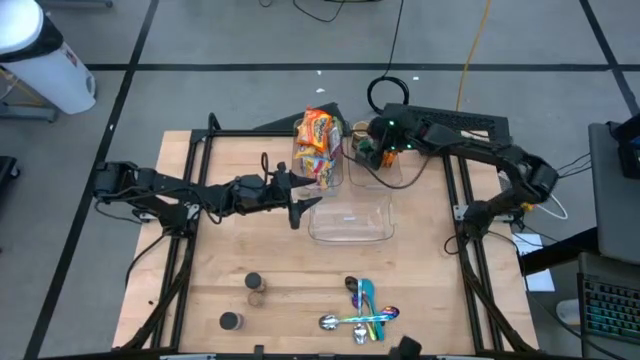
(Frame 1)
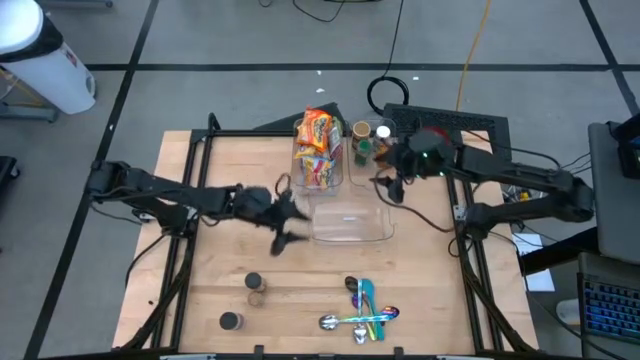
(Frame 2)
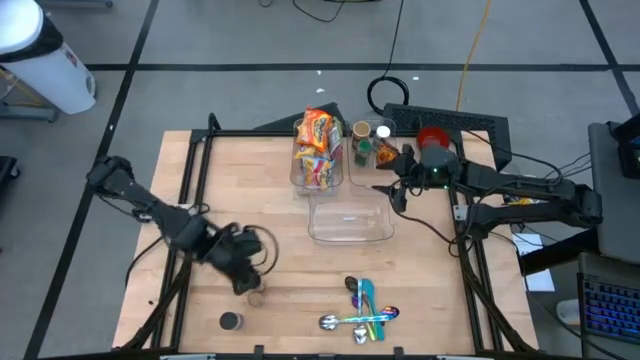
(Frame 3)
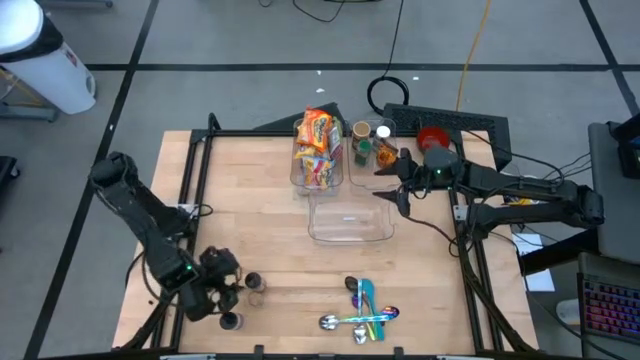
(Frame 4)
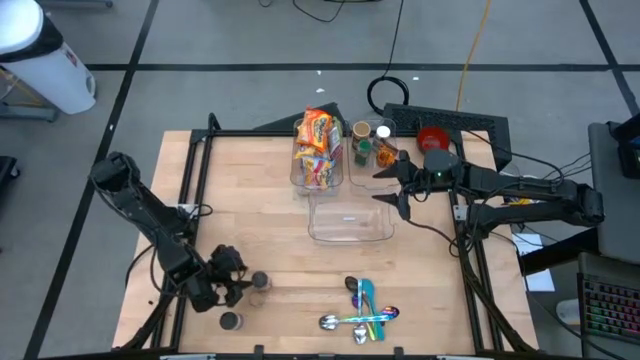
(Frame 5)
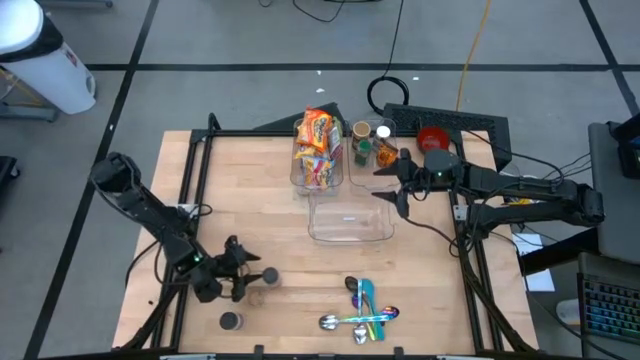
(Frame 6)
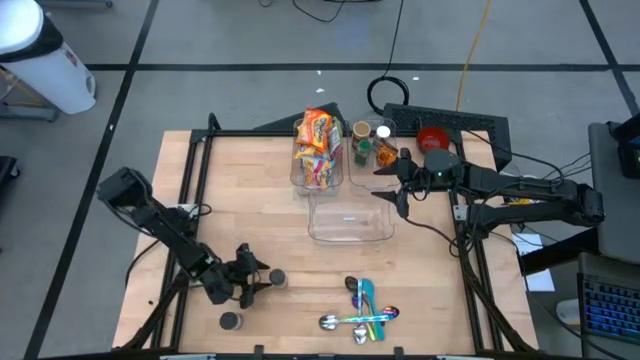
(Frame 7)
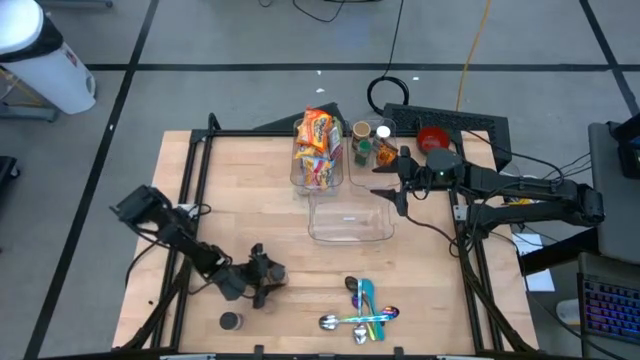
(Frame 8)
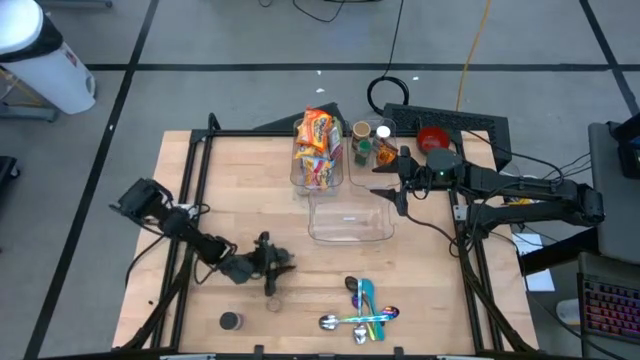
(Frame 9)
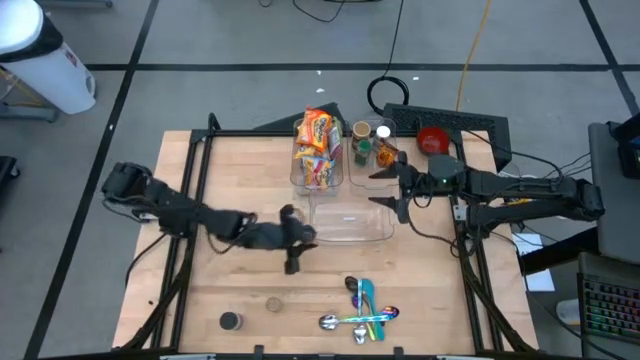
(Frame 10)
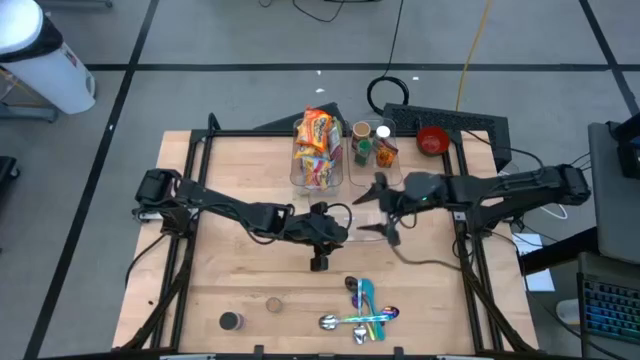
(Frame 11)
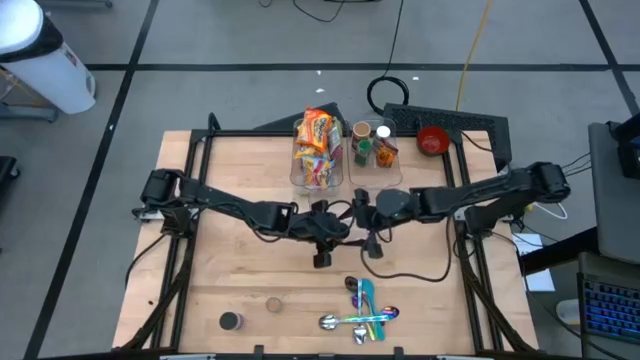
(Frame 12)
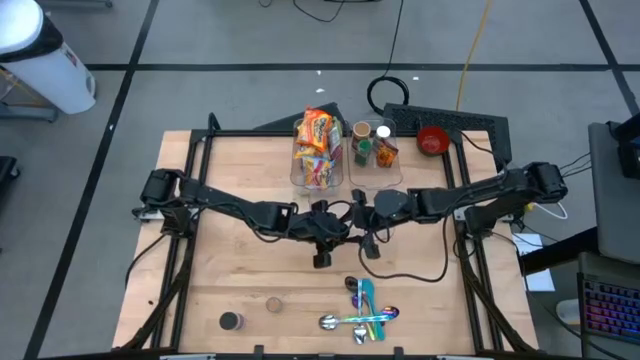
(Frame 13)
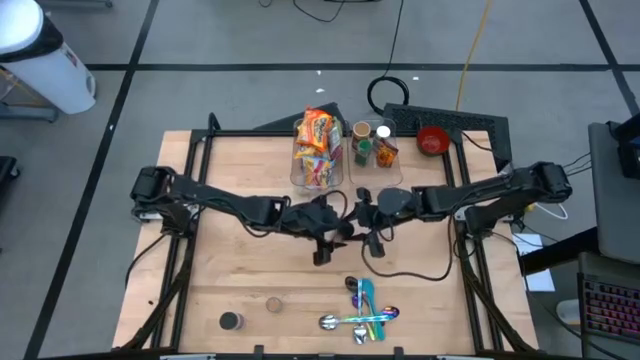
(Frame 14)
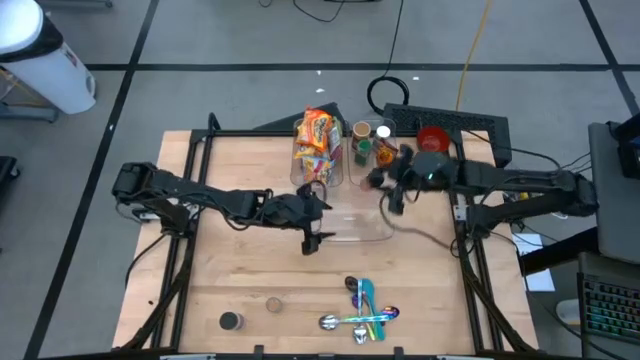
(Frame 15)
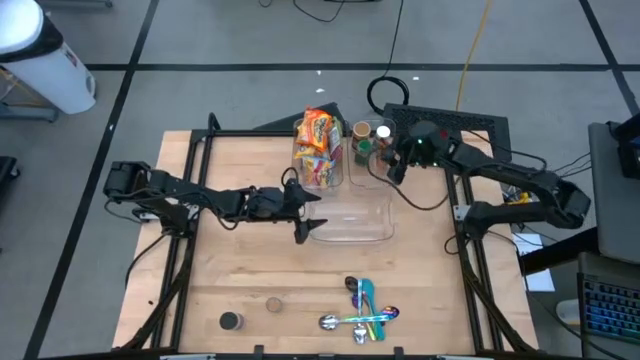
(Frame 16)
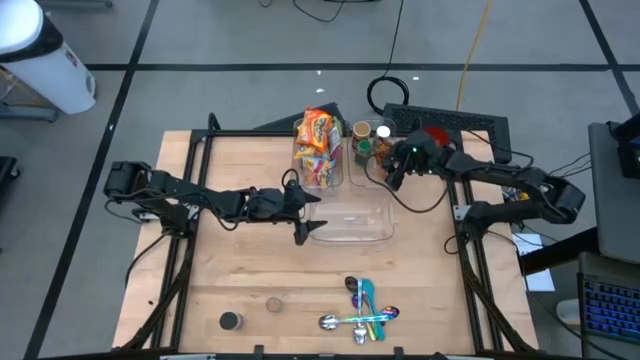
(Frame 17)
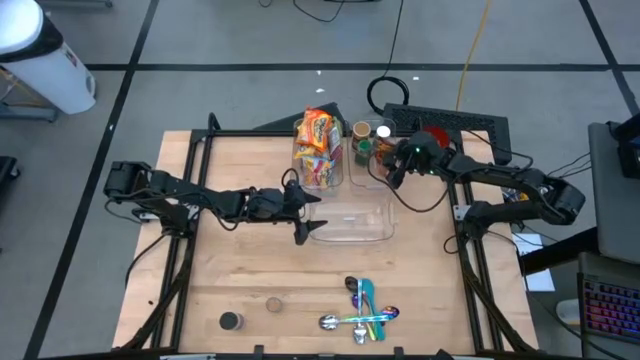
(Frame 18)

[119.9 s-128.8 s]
Task: Pick & Place Food Item
Put the orange seasoning bottle into the right transparent bin

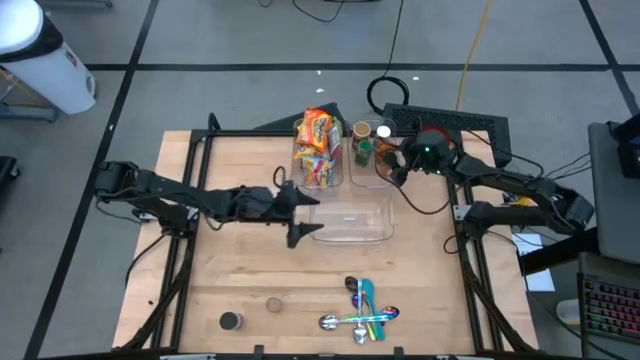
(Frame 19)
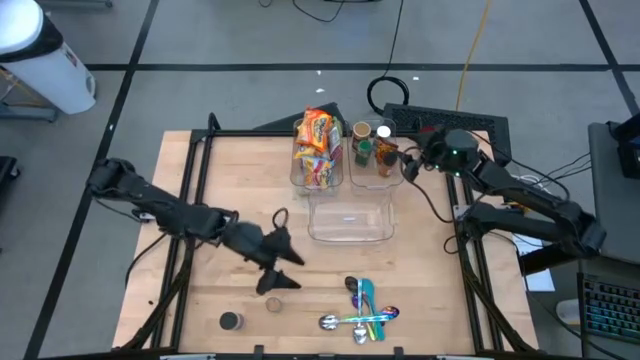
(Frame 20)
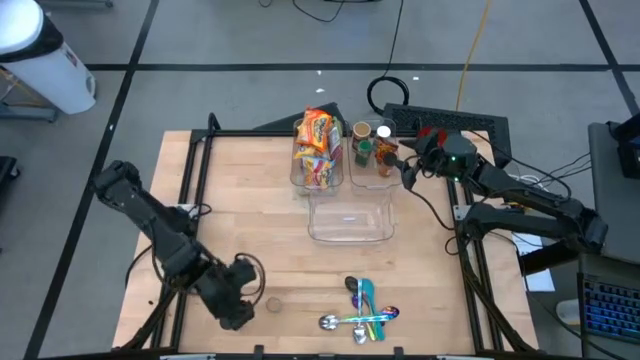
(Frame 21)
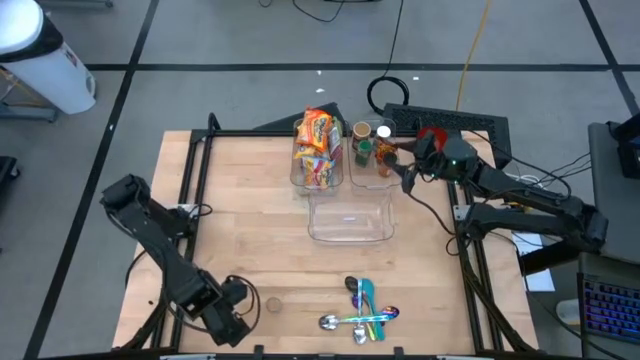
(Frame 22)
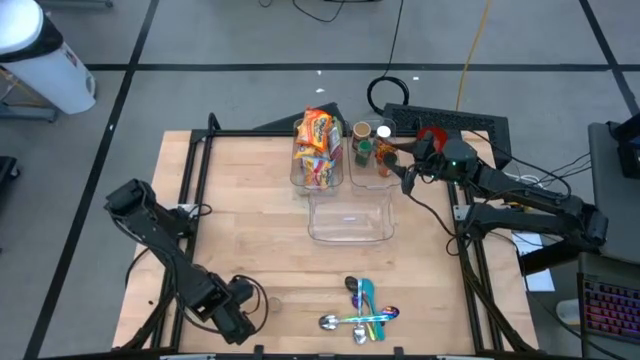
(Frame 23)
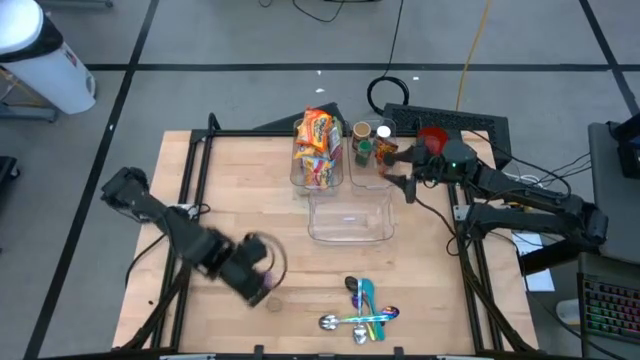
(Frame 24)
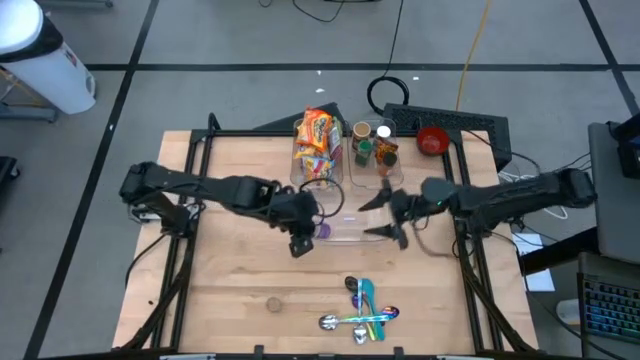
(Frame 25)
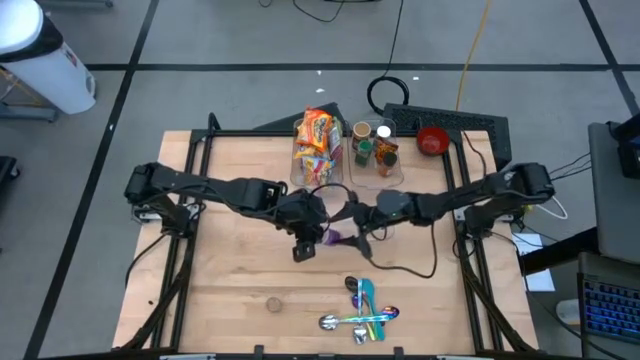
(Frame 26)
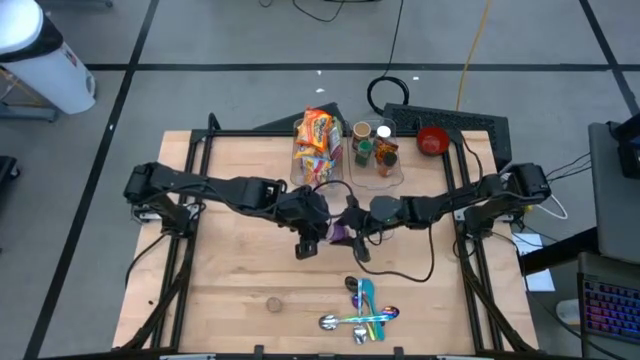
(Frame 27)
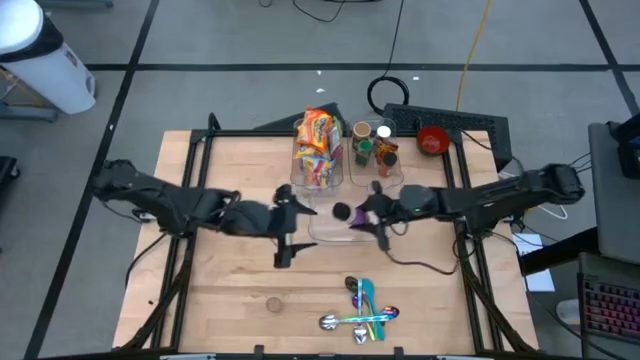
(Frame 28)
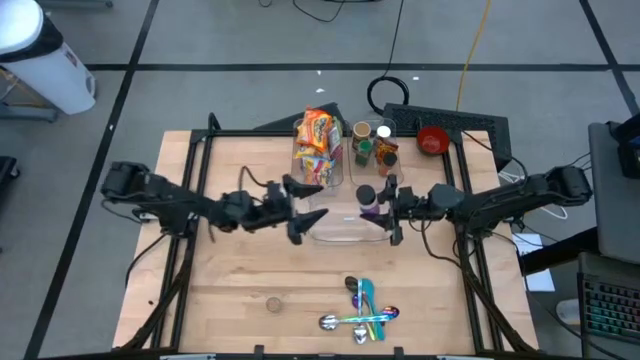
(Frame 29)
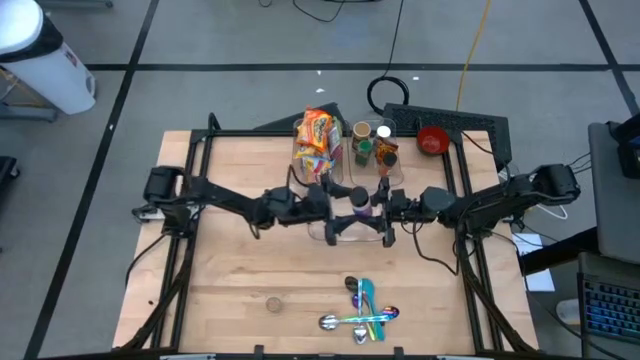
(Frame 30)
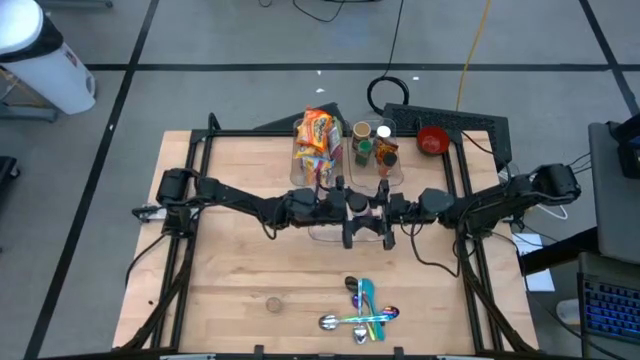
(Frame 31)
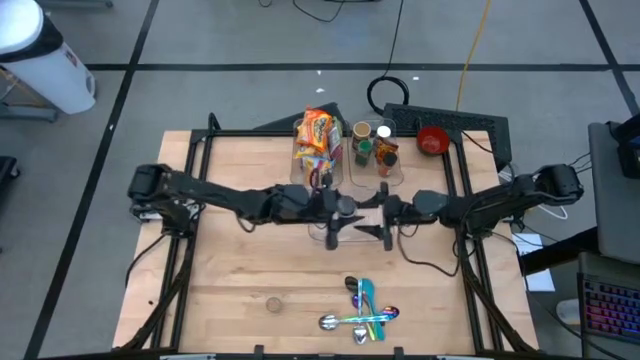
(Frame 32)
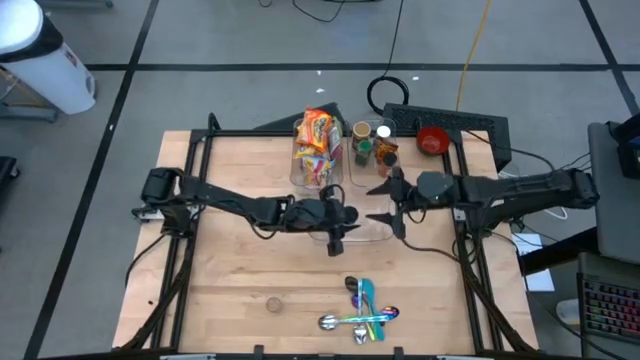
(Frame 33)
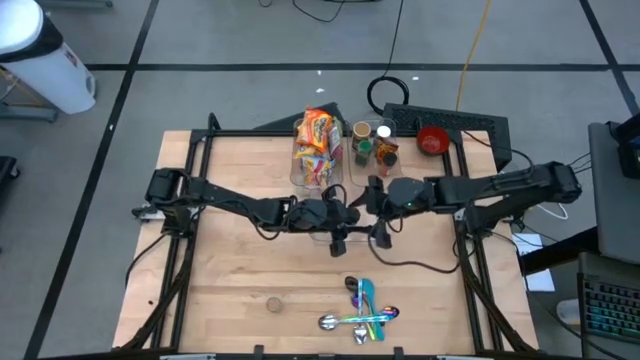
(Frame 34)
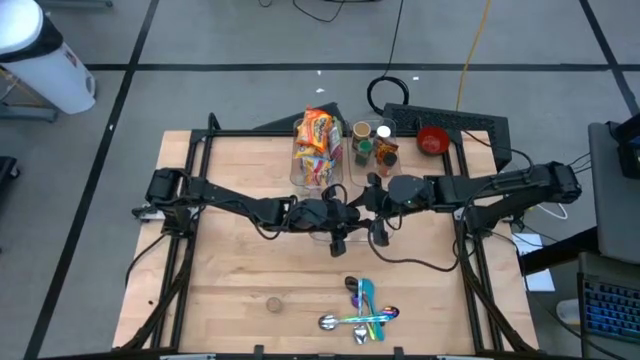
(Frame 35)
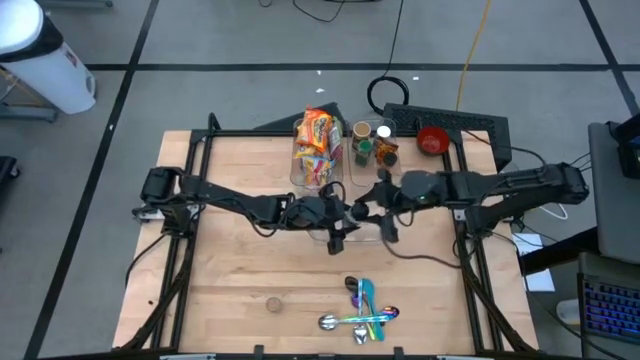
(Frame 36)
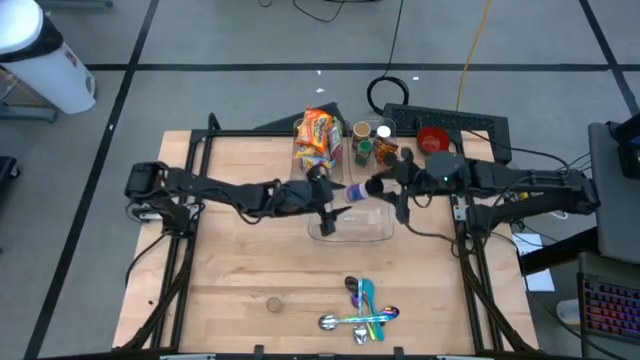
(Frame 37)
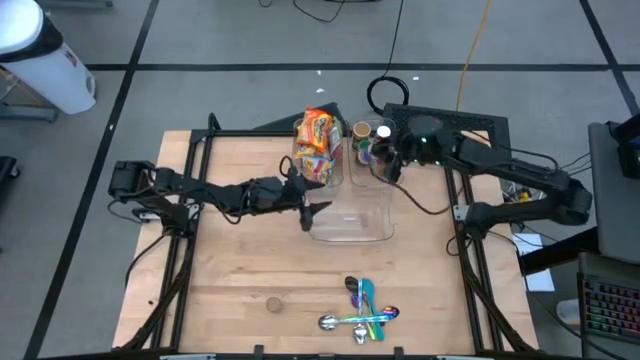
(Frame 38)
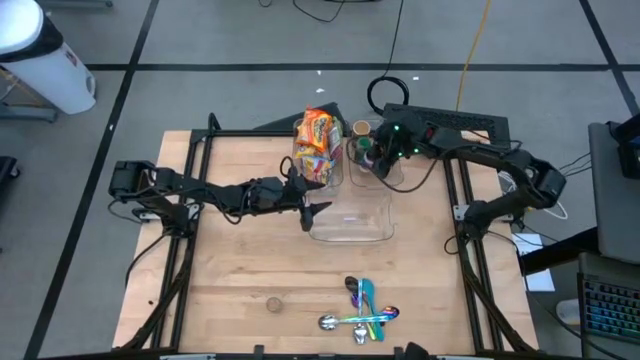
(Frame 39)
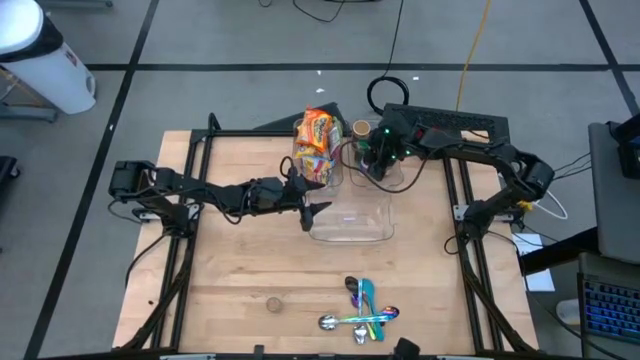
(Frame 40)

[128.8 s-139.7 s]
Put the purple seasoning bottle into the right transparent bin

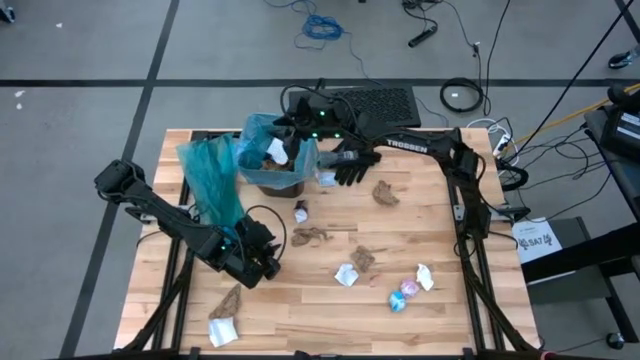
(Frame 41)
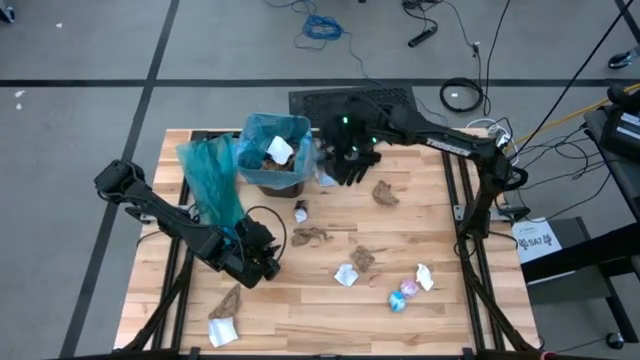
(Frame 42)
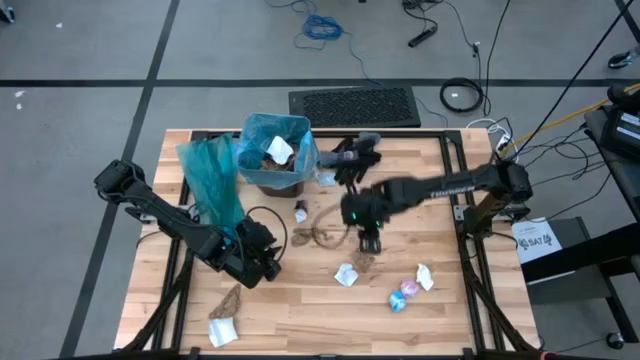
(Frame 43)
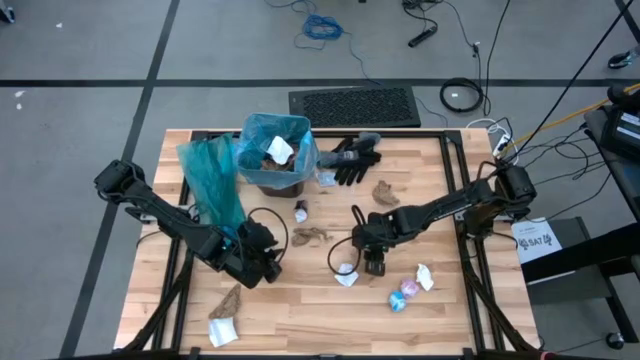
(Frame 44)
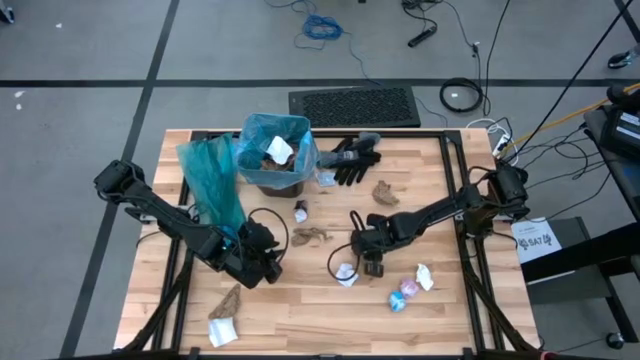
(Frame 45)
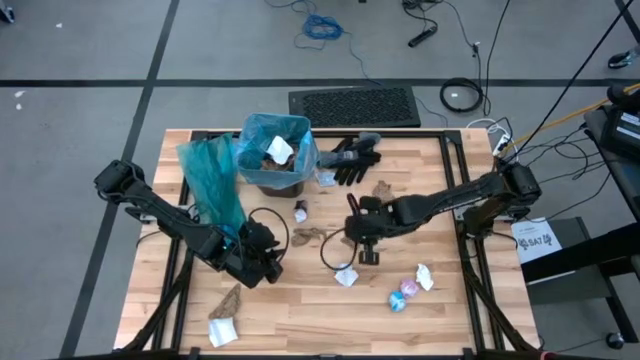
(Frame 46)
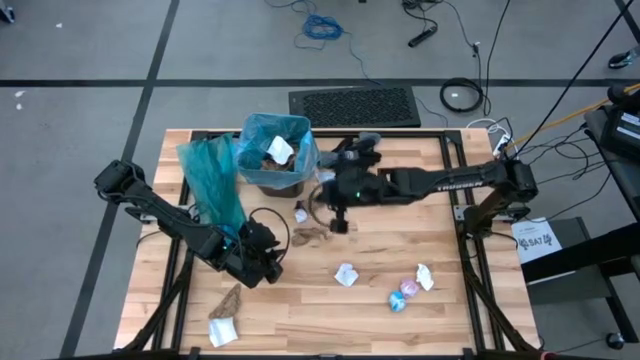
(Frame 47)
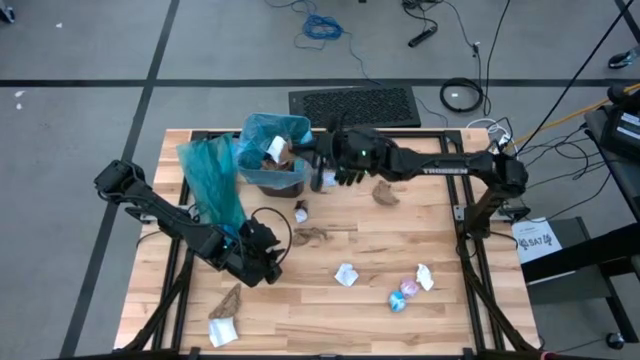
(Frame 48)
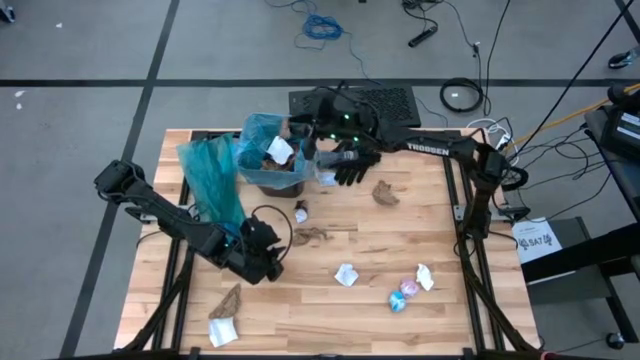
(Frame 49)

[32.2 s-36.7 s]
Task: place trash/remove bag and relplace
Put the brown napkin into the trash bin
